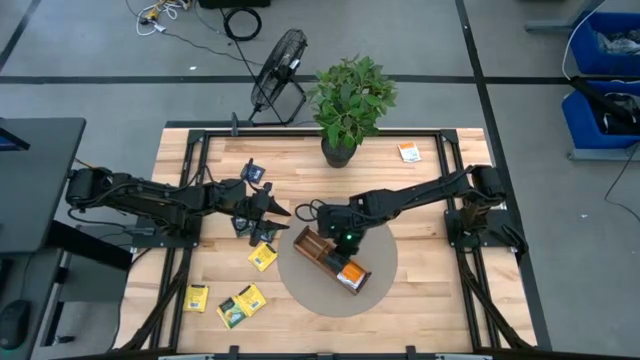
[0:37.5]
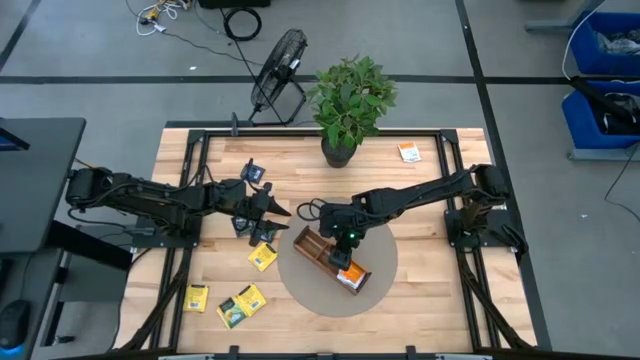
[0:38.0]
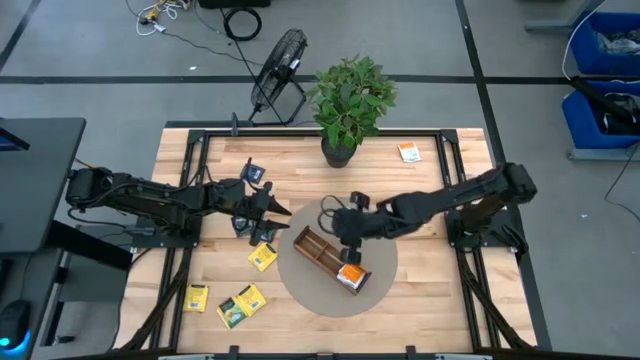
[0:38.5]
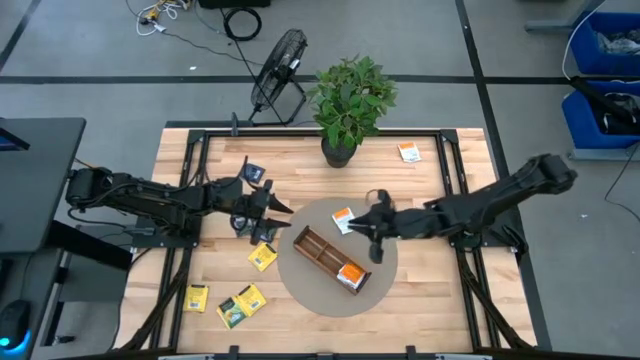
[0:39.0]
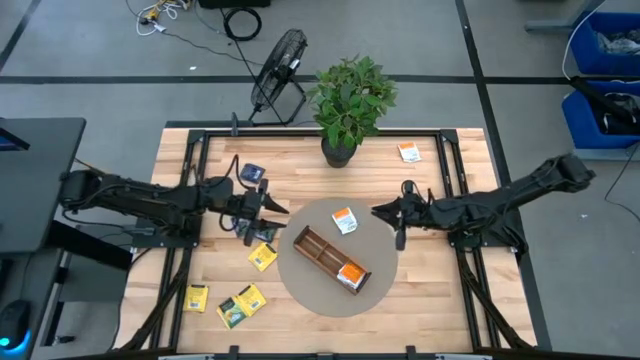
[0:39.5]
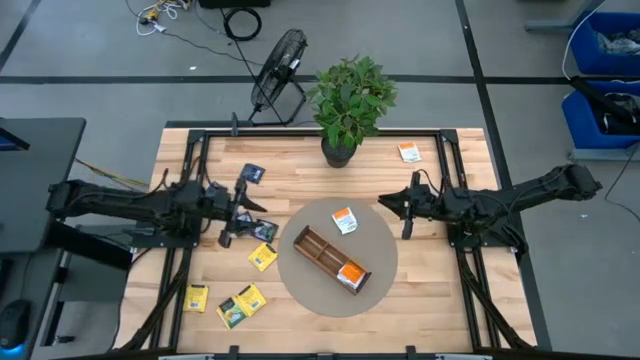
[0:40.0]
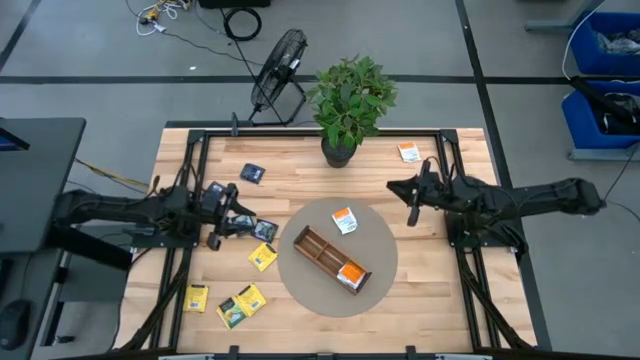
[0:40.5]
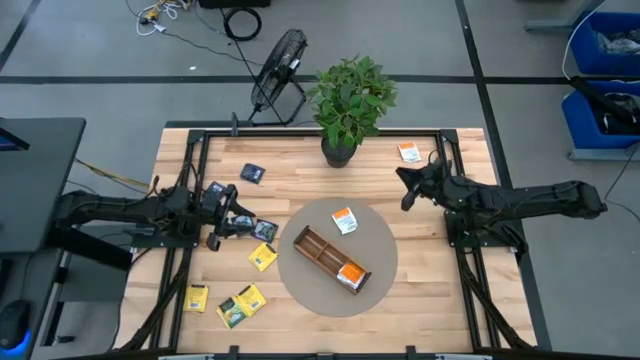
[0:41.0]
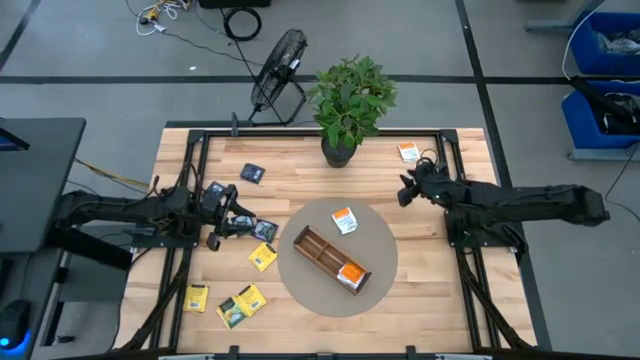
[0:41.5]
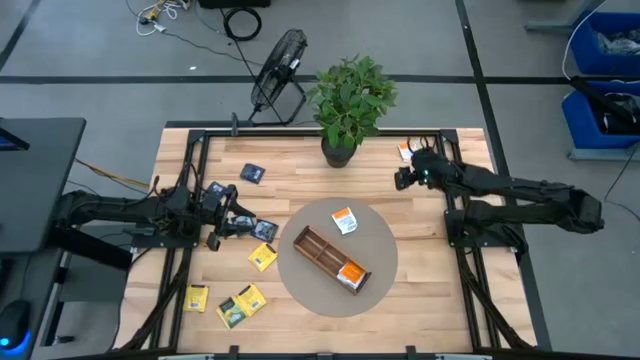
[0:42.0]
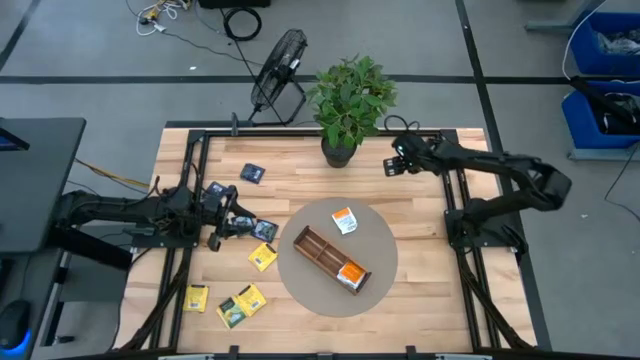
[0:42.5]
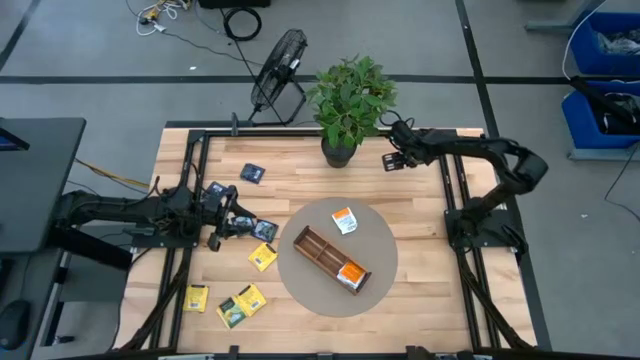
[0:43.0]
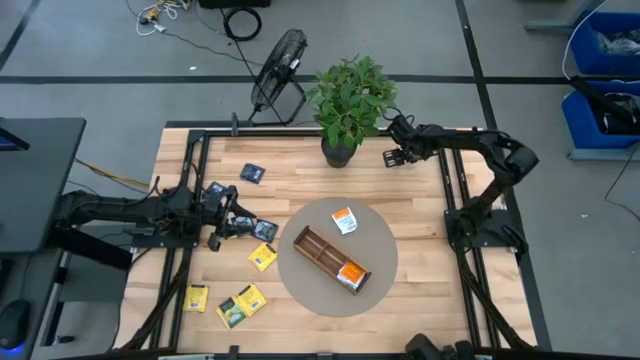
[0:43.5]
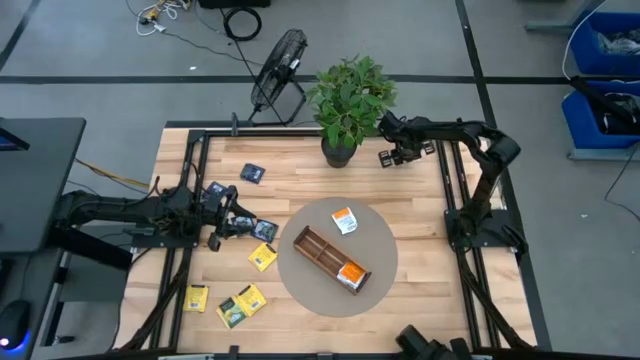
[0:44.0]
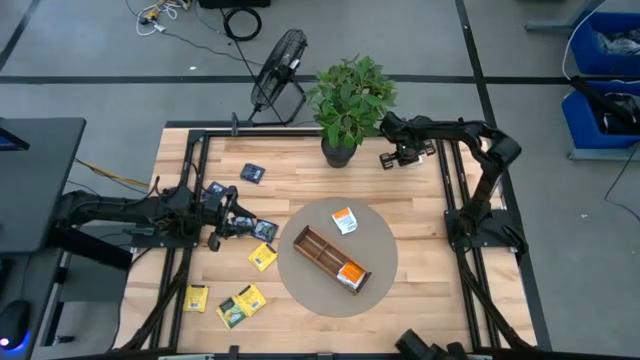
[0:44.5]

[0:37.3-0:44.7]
Task: Pick & Place Tea
Put the orange tea bag into the bottom section of the wooden organizer

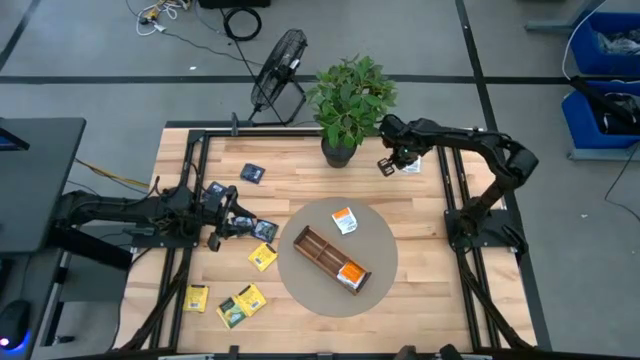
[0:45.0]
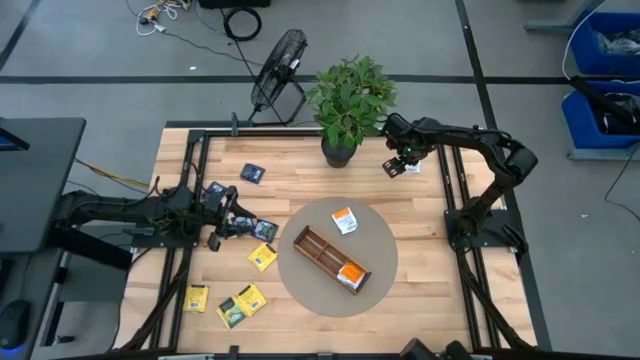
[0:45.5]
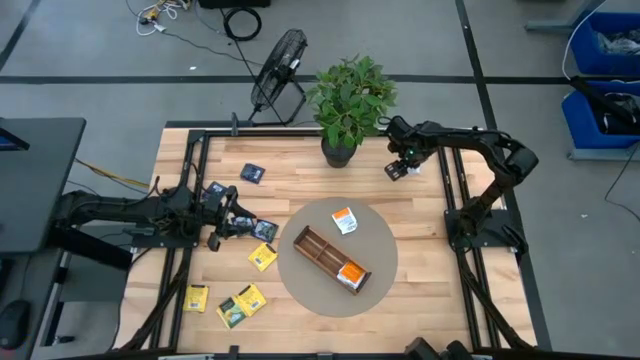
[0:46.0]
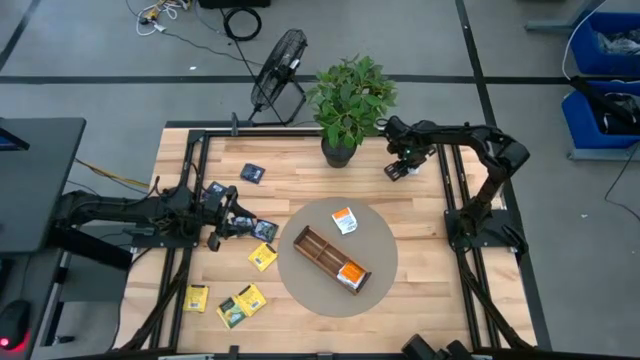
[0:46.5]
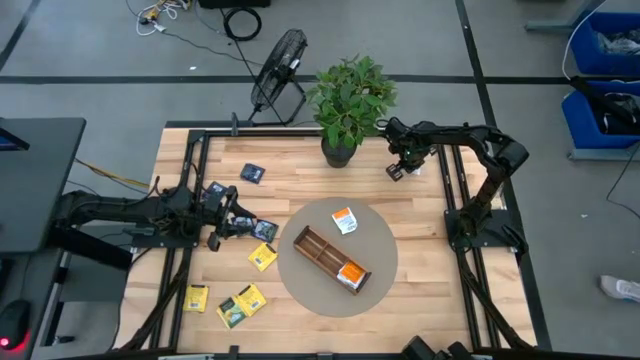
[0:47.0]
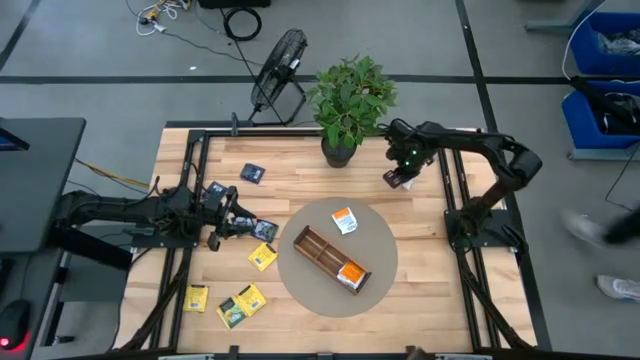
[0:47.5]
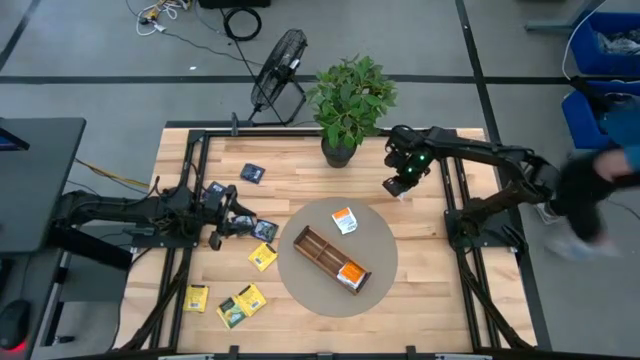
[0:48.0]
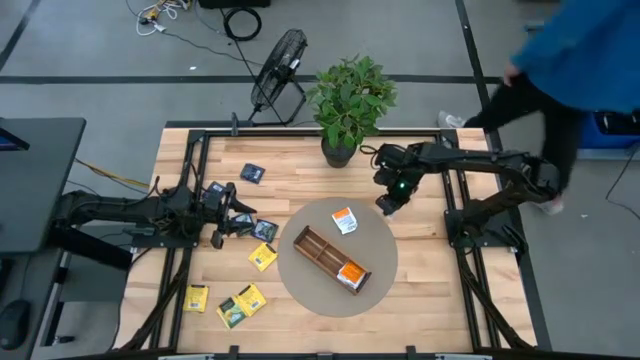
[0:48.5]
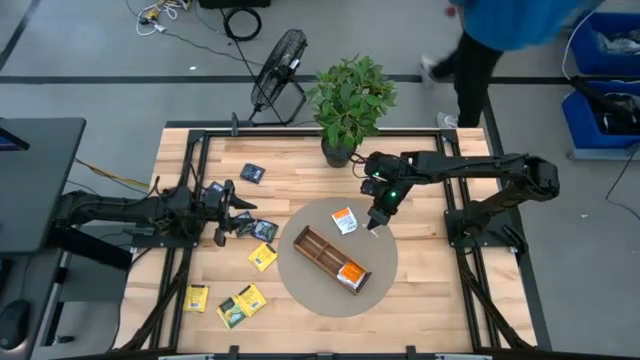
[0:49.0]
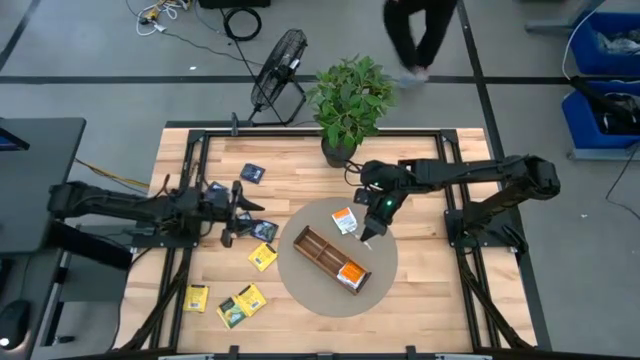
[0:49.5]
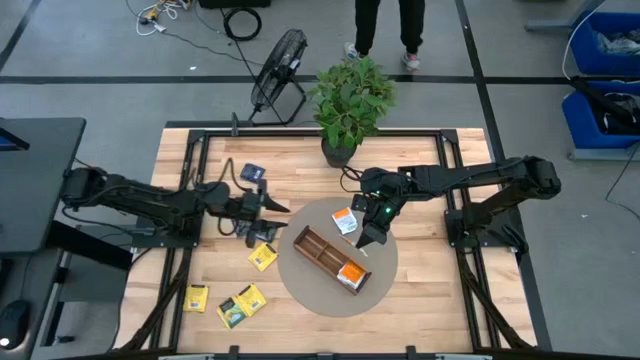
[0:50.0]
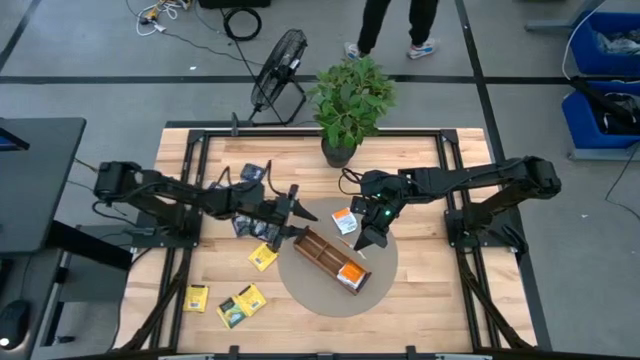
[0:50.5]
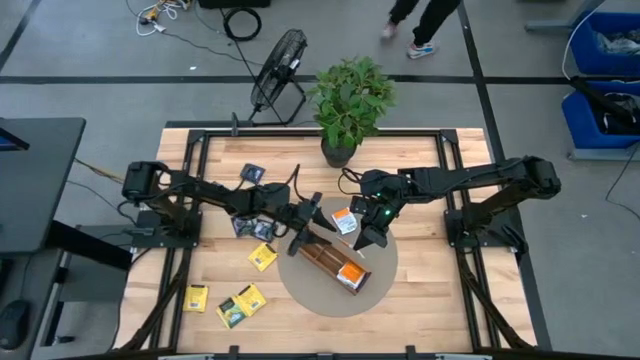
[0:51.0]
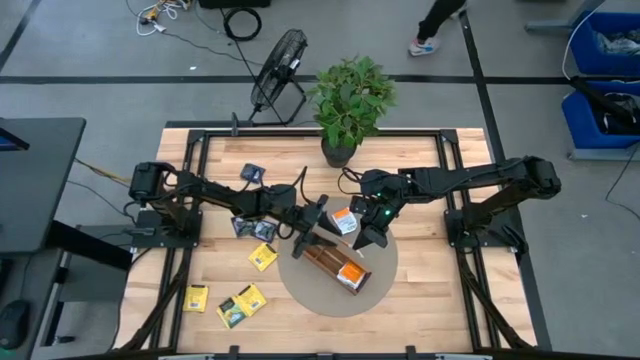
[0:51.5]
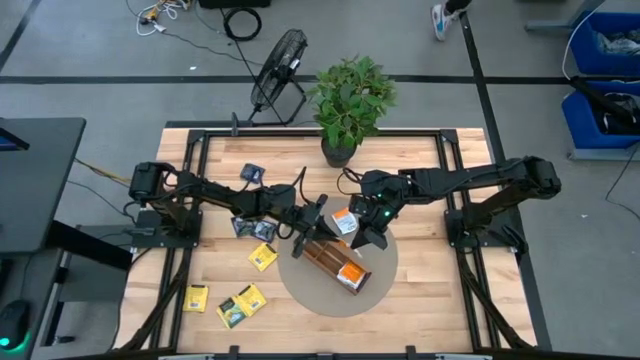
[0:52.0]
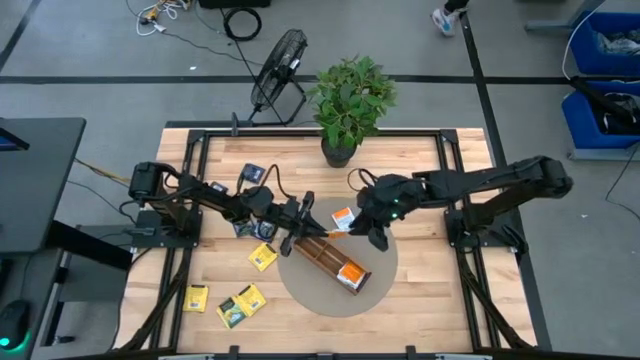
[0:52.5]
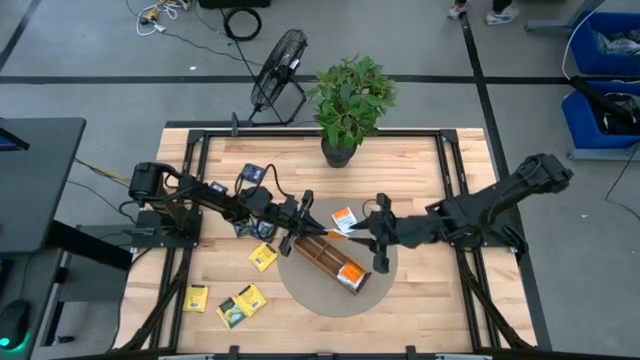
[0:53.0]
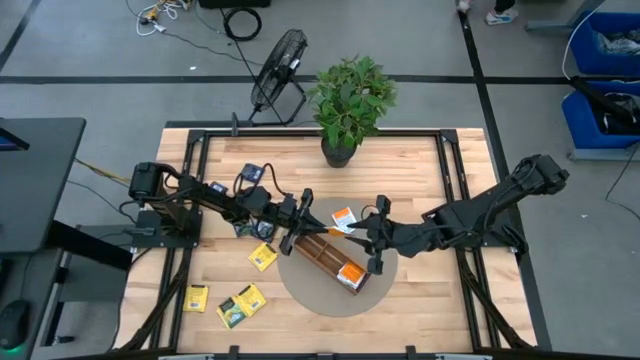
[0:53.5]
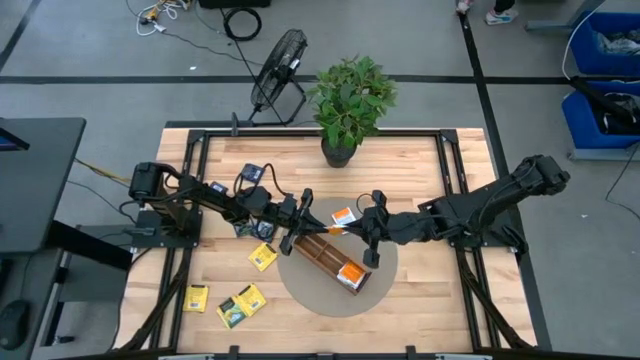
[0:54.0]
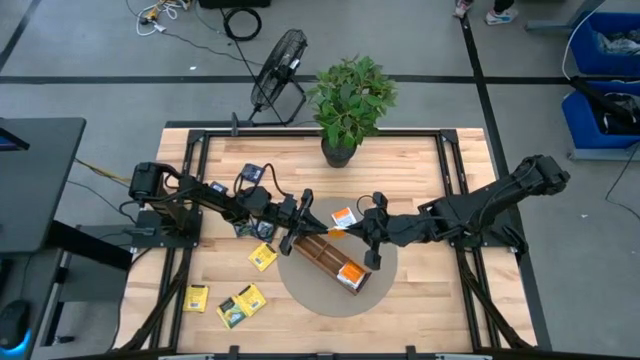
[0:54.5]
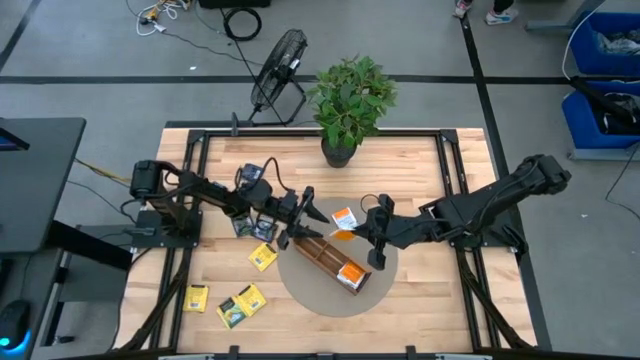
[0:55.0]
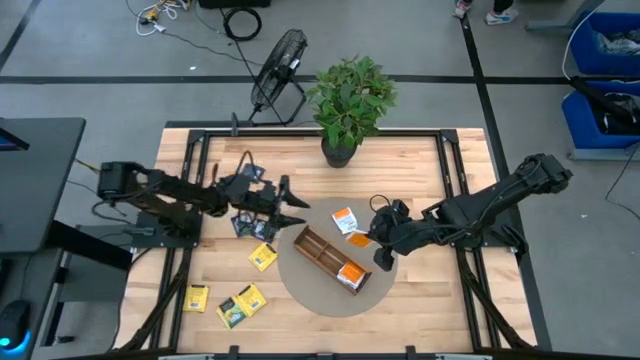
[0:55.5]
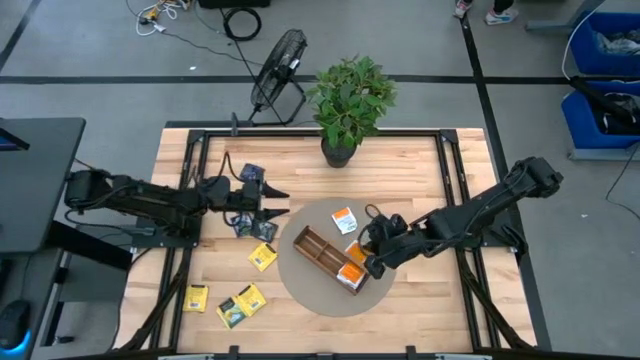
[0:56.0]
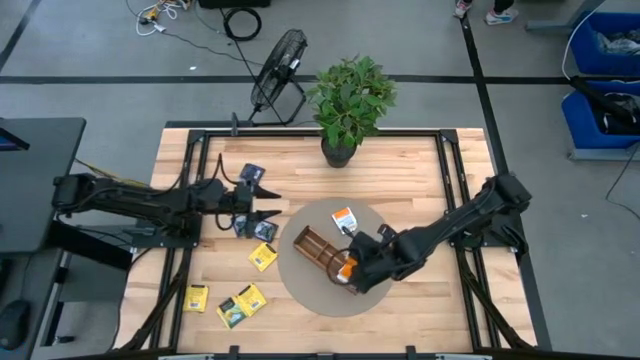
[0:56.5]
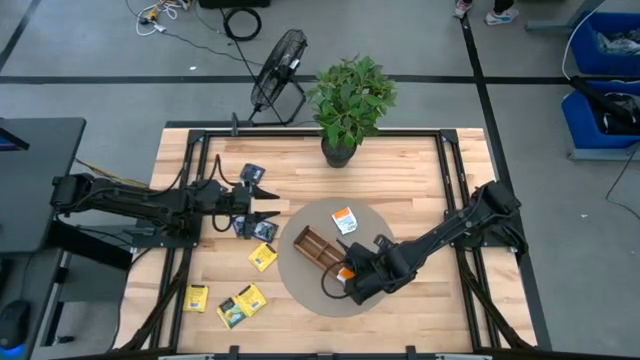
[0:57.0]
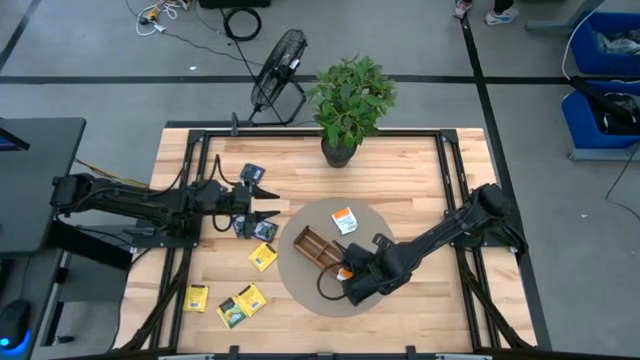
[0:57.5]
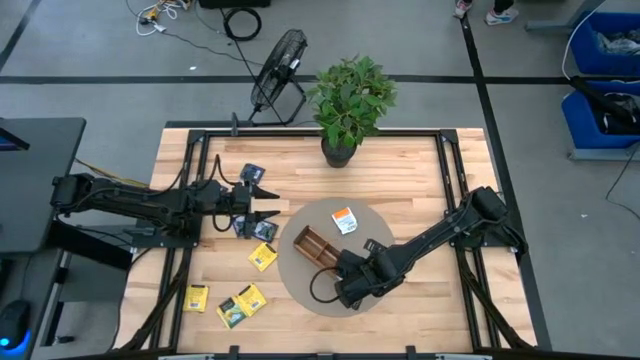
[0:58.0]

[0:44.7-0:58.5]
Put the orange tea bag into the bottom section of the wooden organizer

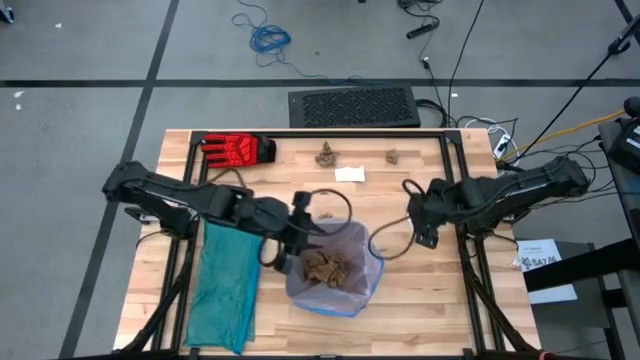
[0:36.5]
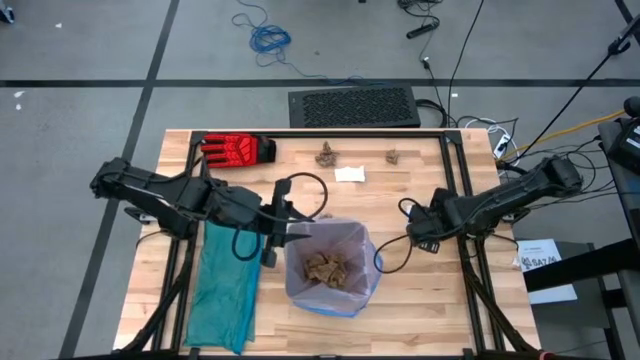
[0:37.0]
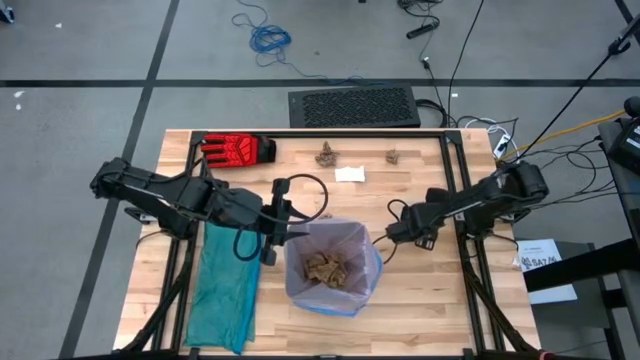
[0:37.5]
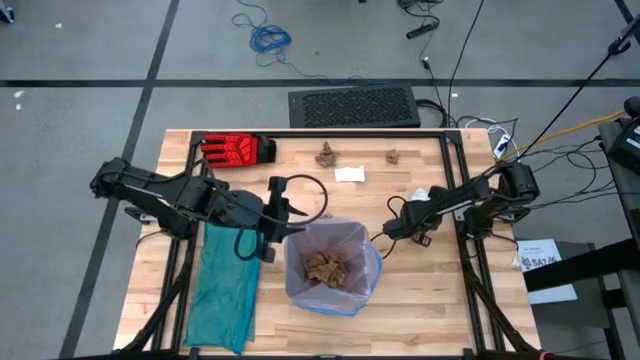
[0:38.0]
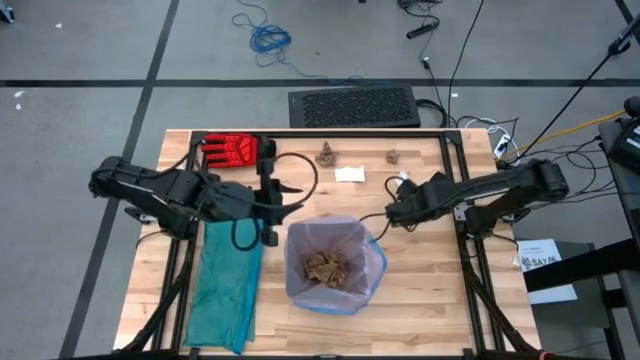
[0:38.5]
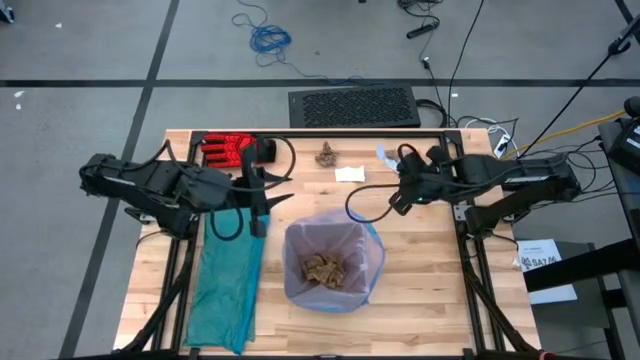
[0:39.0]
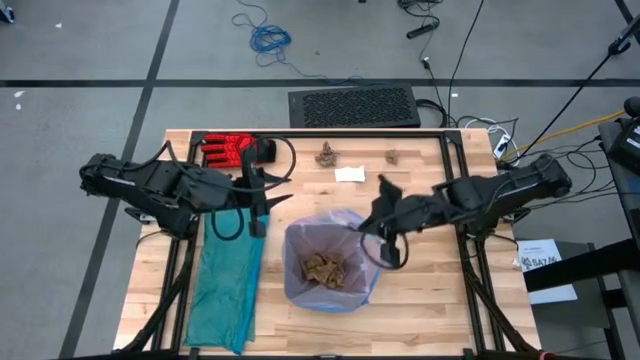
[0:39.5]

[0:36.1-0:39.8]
Task: place trash/remove bag and relplace
Put the white paper into the black trash bin
